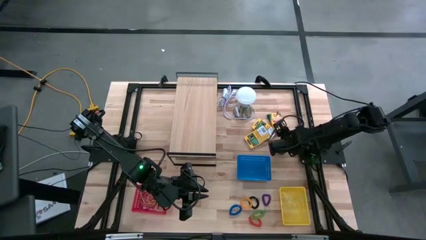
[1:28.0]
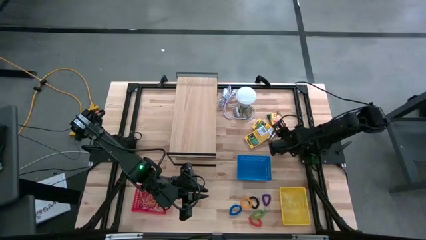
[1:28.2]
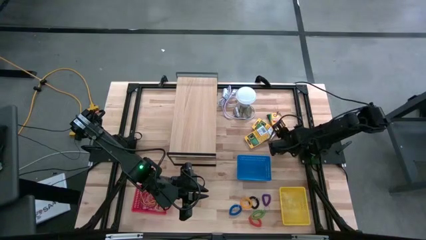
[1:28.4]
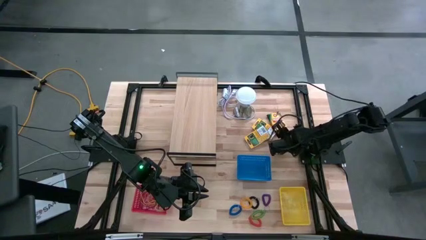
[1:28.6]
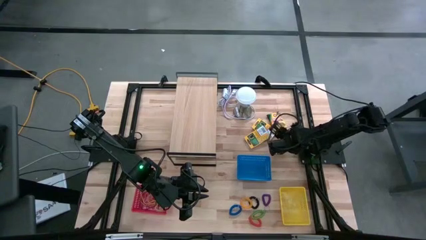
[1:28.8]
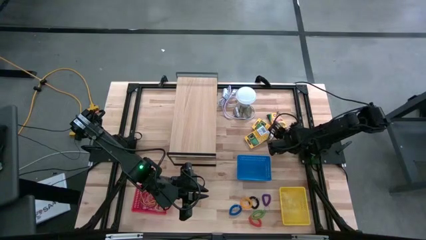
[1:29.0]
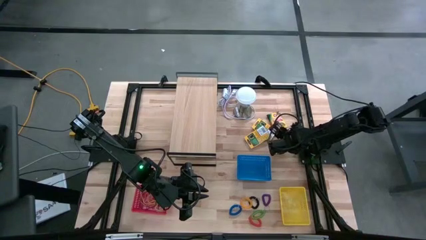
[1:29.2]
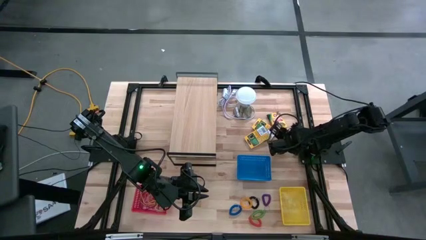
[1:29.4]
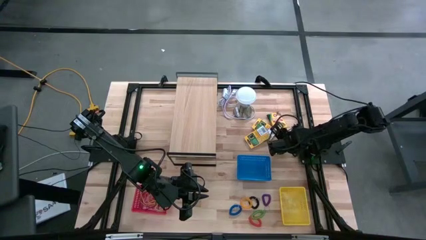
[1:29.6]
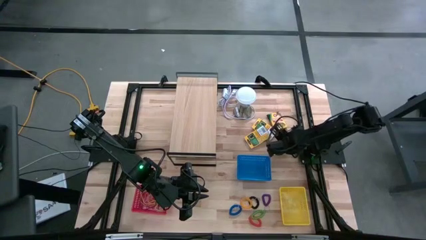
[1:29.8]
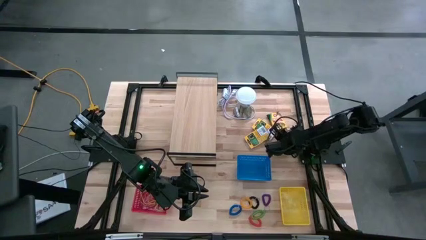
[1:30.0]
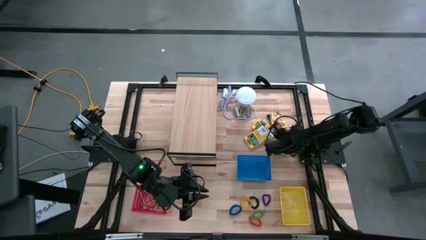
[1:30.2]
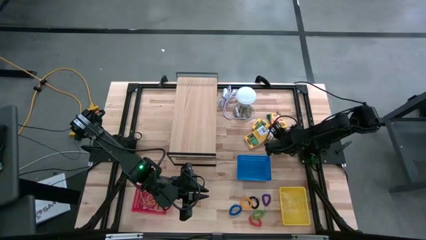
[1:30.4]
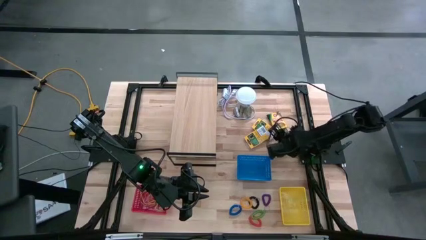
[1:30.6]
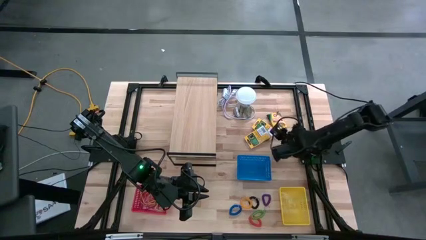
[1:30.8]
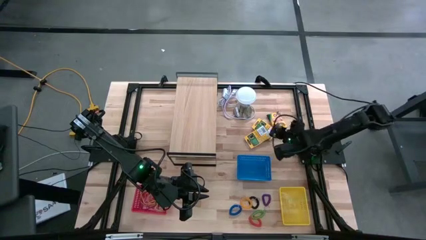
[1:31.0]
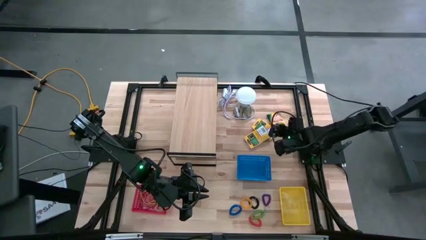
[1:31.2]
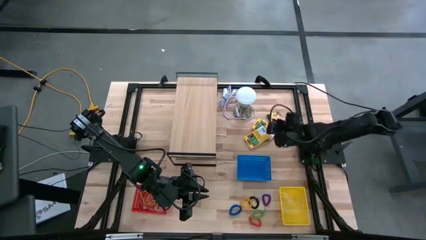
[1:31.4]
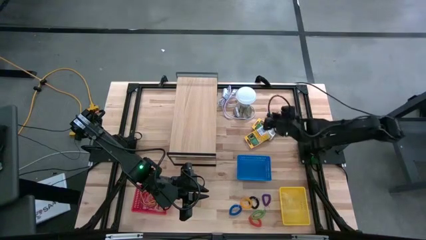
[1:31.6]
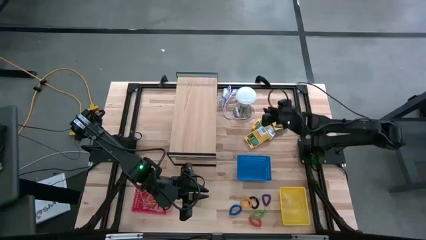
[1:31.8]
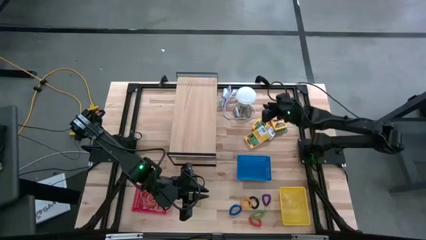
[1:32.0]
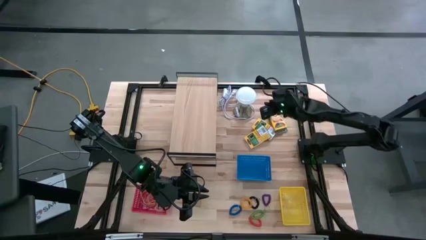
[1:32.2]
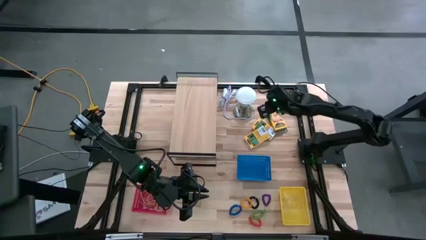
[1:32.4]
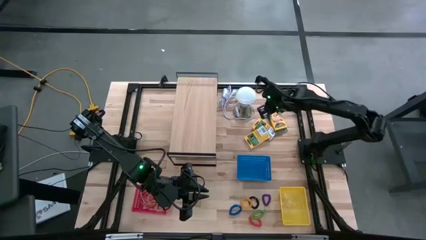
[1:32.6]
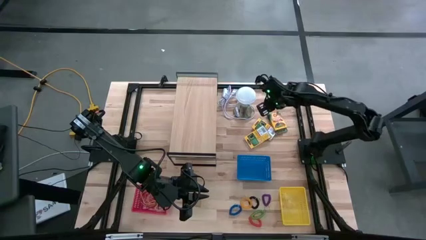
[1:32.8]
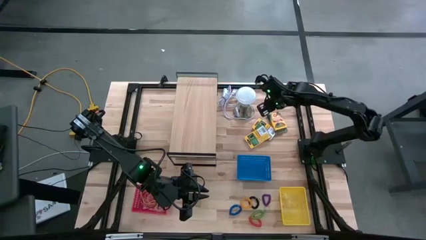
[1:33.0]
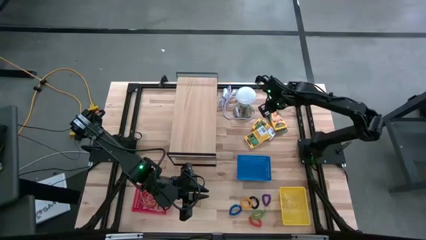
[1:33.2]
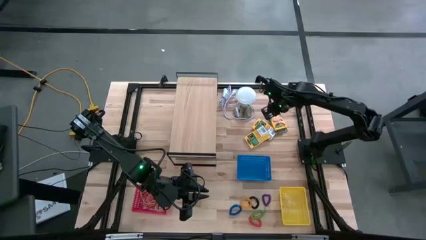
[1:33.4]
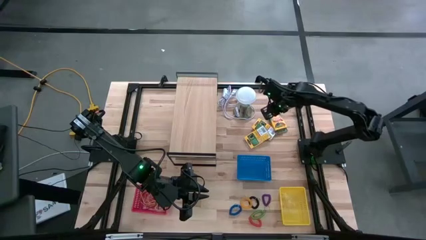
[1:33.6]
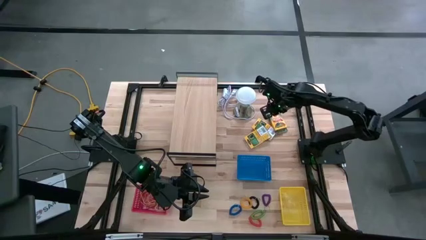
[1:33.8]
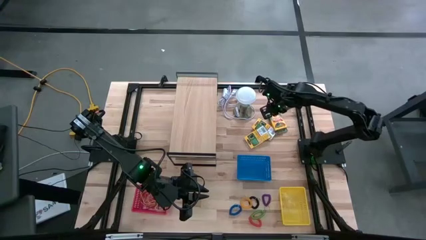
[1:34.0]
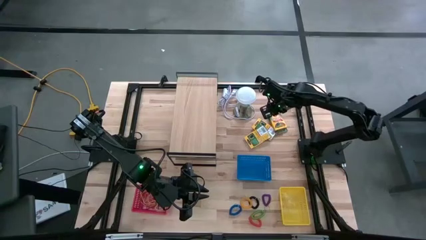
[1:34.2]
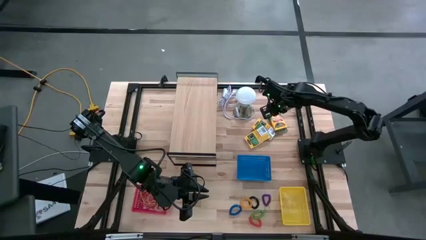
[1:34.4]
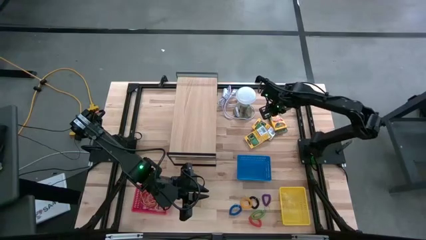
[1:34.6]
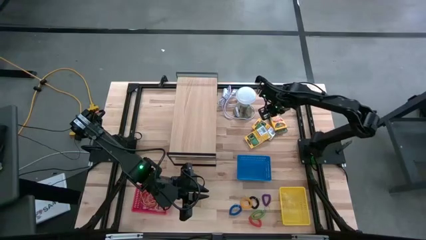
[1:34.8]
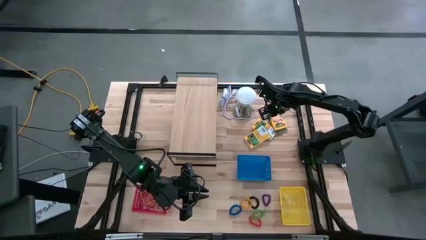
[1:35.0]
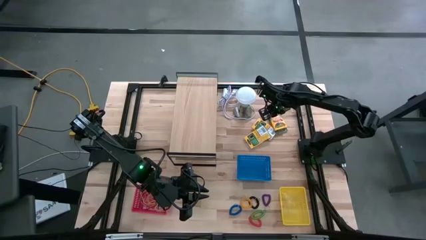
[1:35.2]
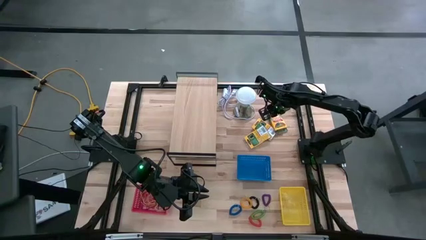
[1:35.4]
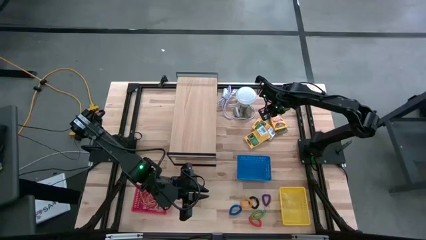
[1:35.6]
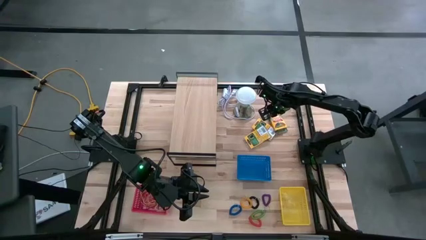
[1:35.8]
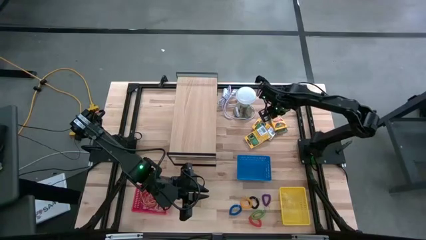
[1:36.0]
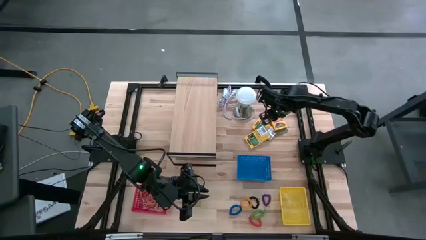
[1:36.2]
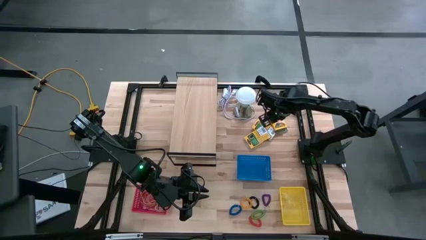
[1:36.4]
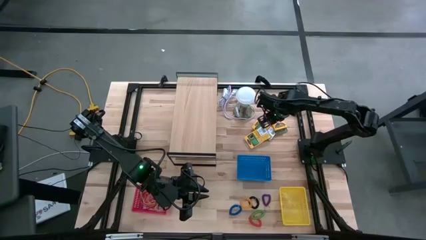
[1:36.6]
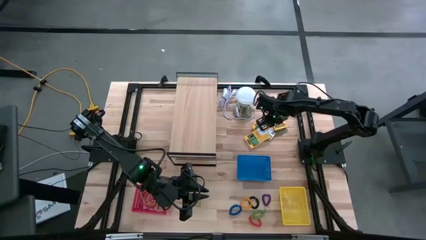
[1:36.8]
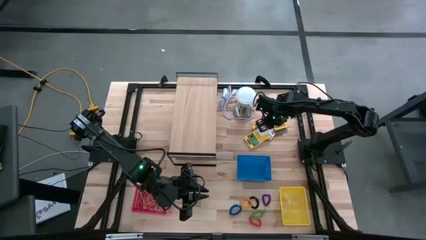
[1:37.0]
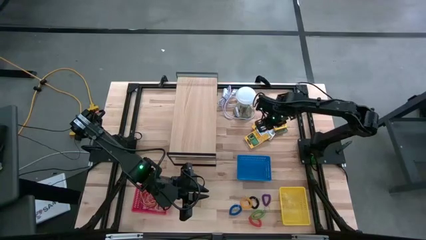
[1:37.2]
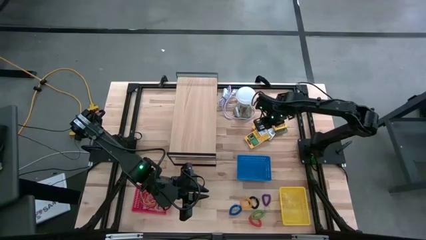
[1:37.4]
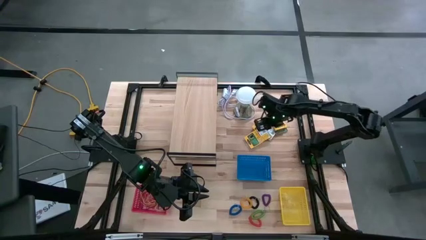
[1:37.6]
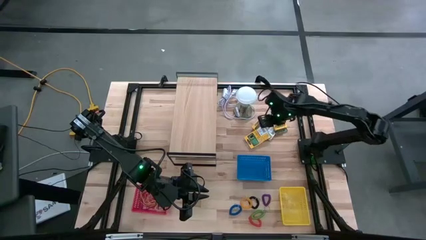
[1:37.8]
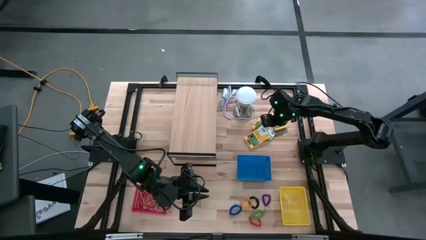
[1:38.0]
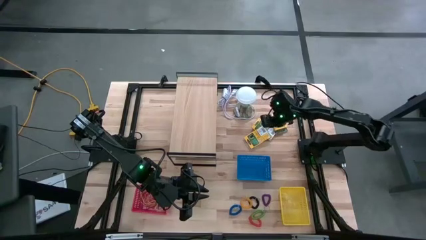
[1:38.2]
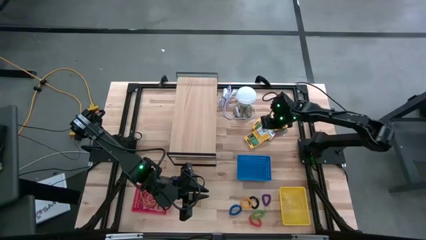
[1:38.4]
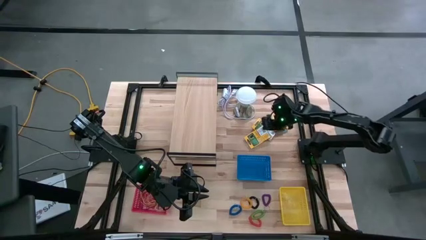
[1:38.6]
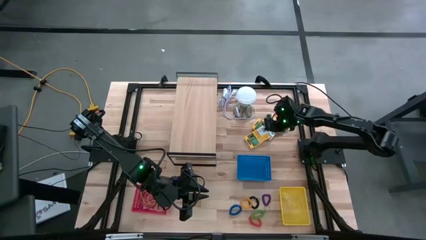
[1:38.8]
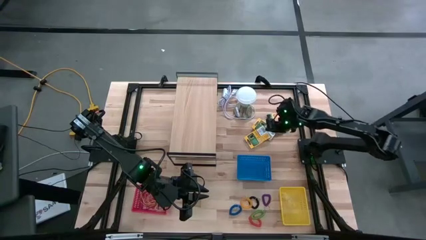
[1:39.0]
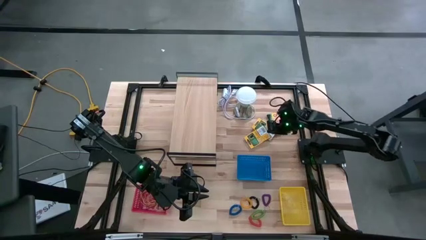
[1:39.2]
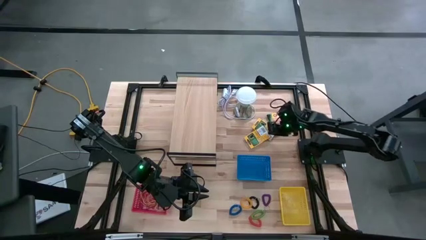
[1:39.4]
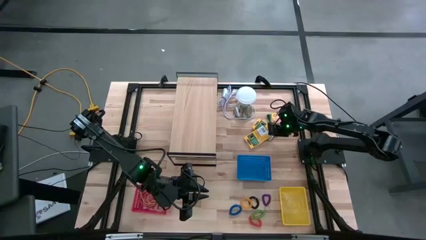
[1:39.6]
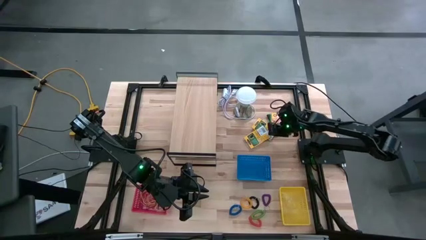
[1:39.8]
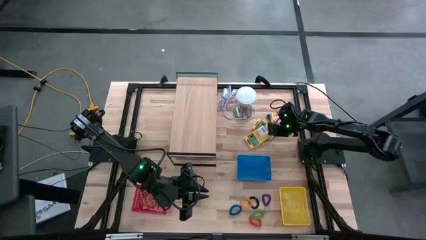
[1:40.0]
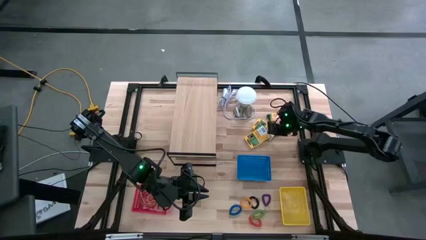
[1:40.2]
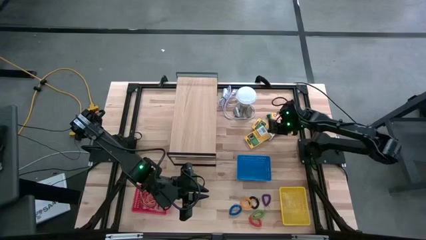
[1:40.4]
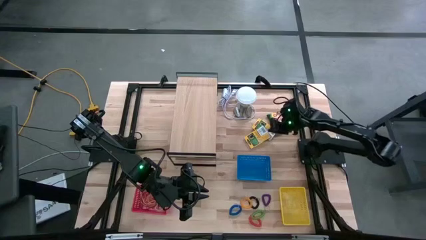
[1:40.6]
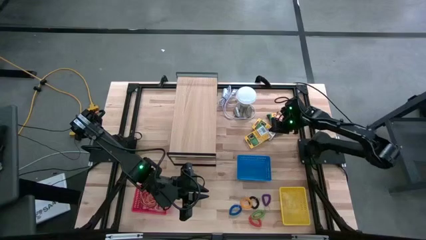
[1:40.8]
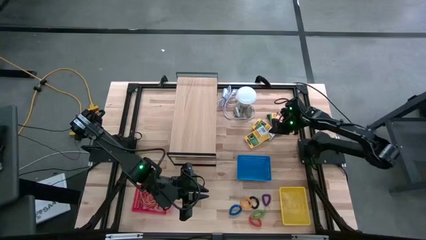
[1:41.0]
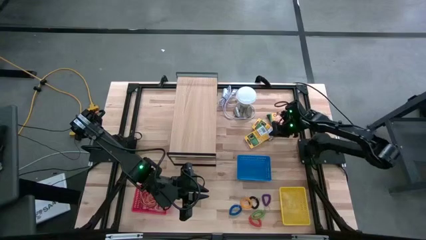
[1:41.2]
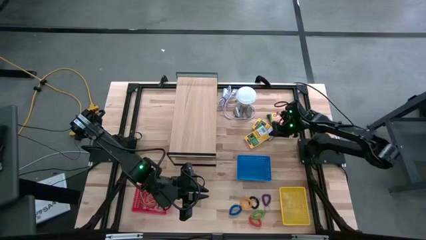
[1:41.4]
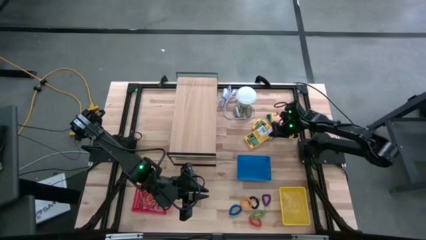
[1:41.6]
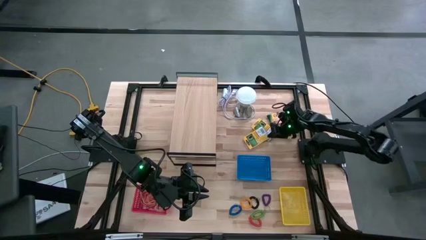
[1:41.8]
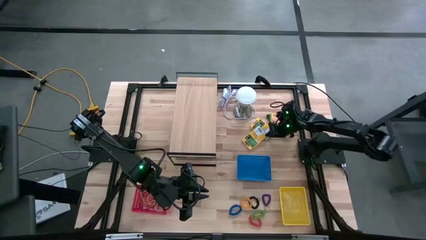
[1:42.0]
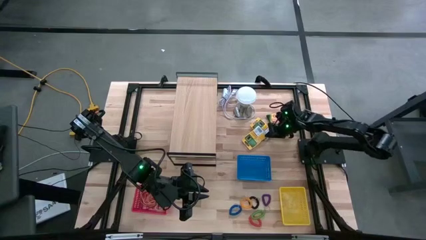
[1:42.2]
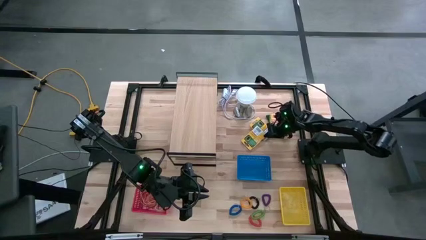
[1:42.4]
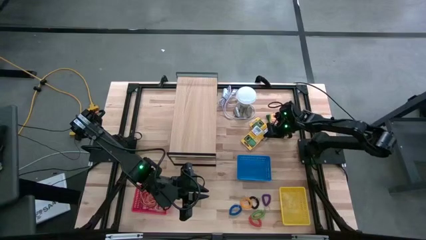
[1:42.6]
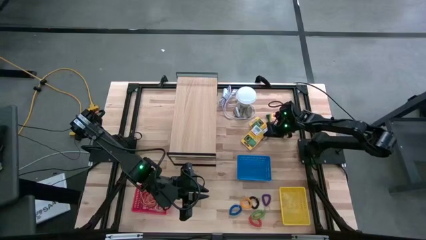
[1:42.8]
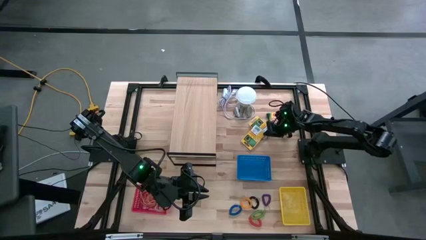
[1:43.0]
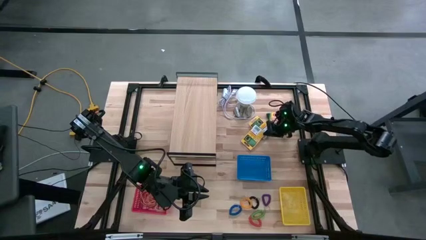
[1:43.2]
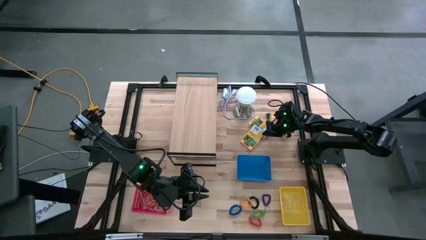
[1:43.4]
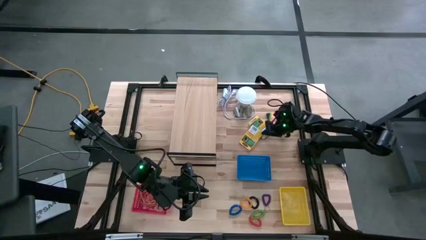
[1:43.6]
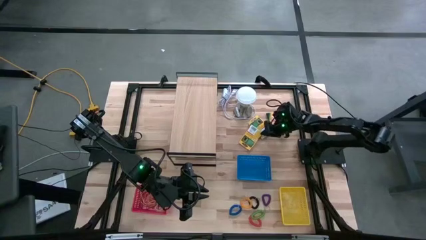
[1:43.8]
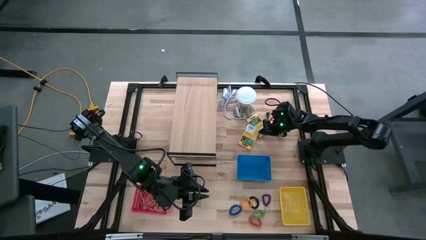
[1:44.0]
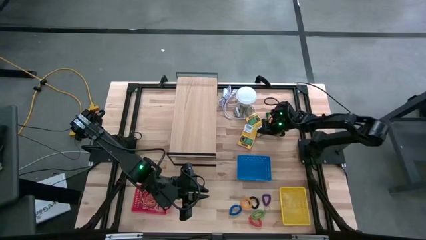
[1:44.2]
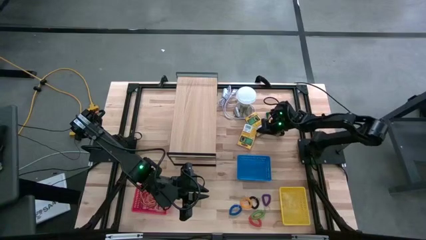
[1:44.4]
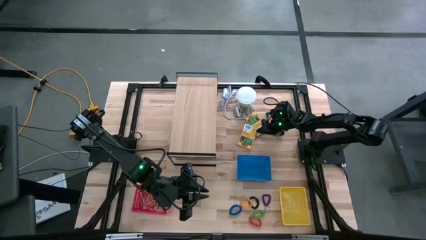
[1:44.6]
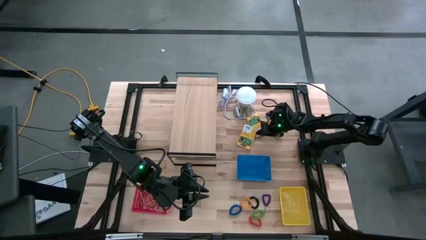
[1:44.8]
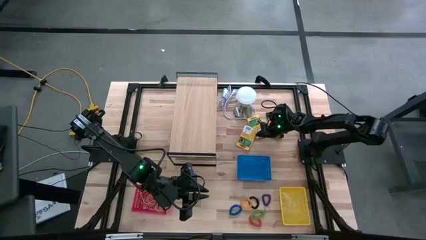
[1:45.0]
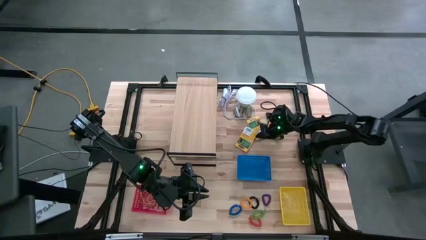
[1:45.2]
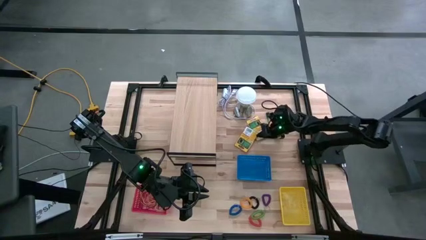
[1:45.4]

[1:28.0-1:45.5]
Task: Pick & Place Office Desk Supplies
Put the bottom yellow crayon box into the blue bin
